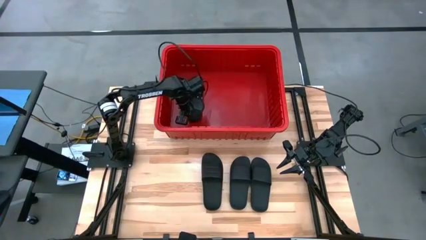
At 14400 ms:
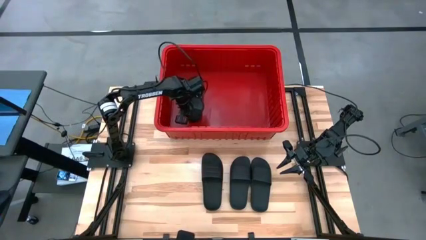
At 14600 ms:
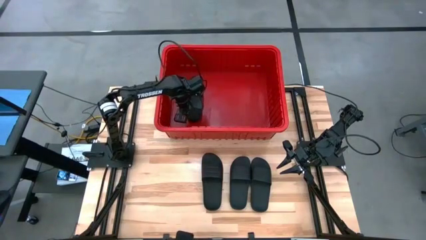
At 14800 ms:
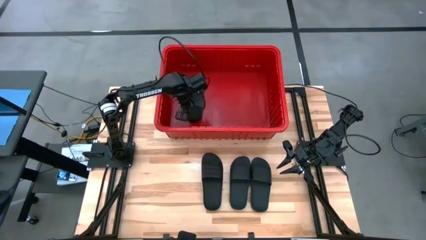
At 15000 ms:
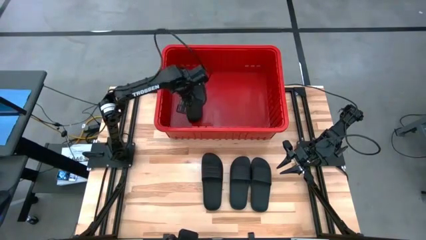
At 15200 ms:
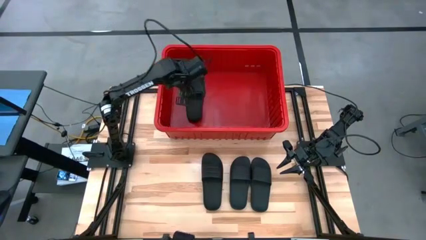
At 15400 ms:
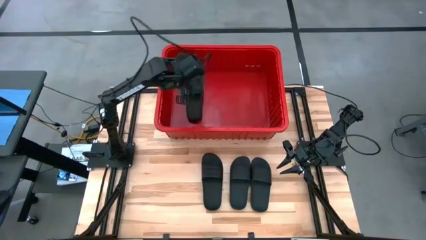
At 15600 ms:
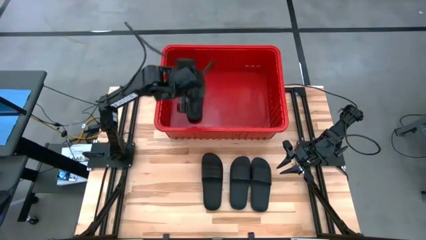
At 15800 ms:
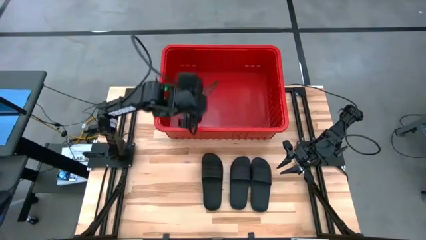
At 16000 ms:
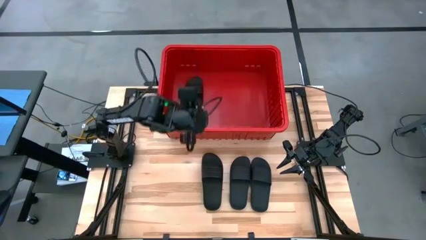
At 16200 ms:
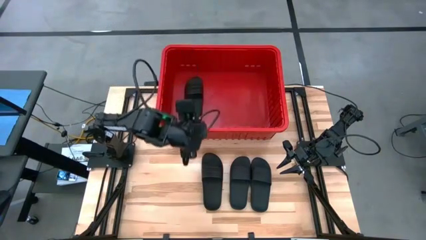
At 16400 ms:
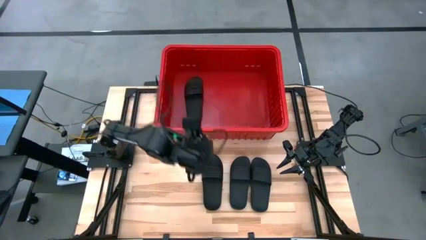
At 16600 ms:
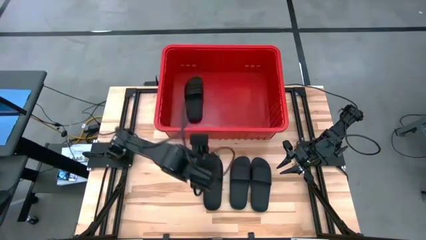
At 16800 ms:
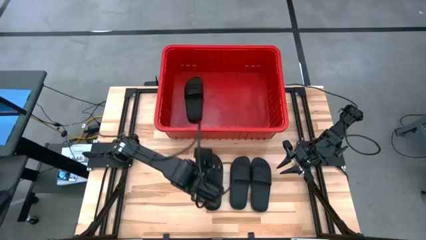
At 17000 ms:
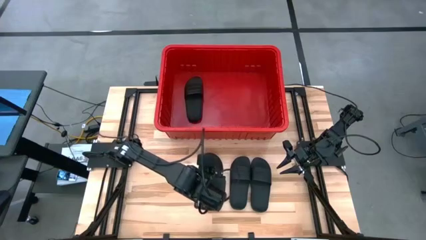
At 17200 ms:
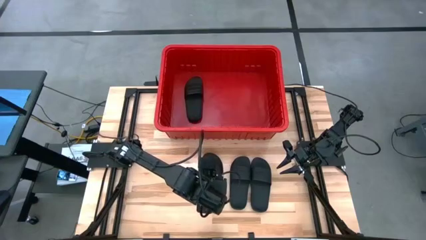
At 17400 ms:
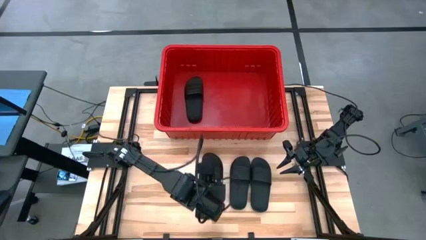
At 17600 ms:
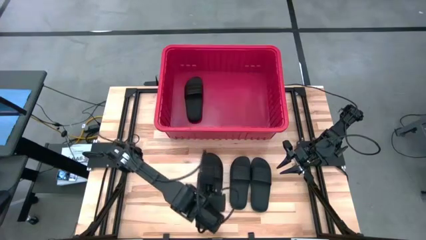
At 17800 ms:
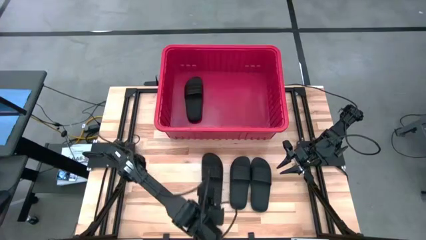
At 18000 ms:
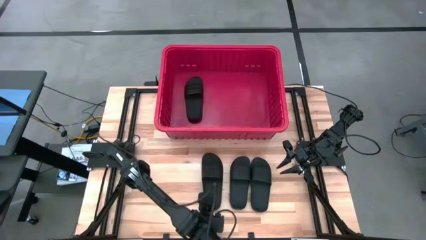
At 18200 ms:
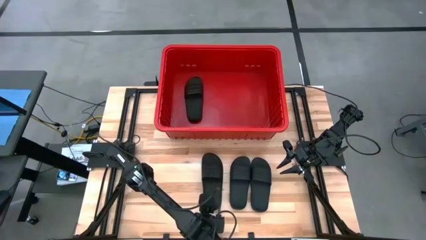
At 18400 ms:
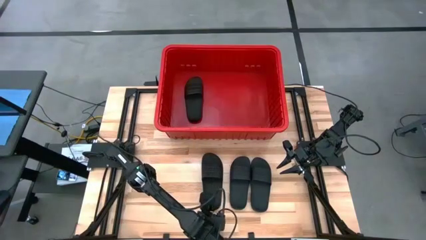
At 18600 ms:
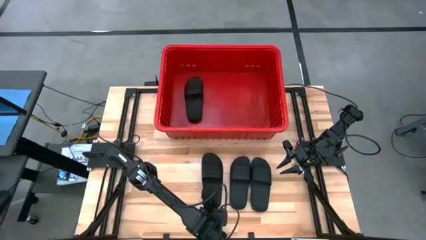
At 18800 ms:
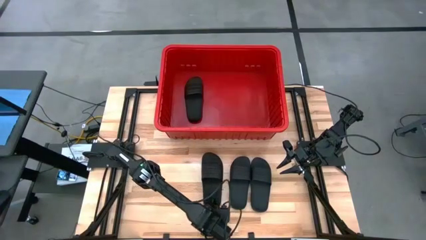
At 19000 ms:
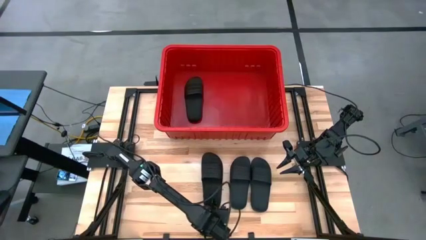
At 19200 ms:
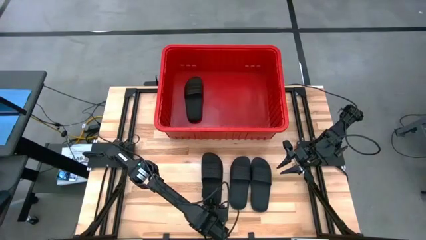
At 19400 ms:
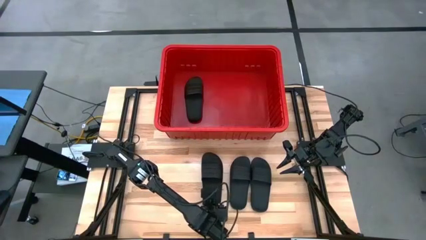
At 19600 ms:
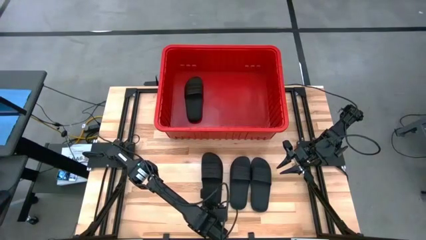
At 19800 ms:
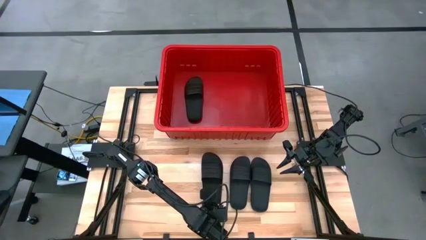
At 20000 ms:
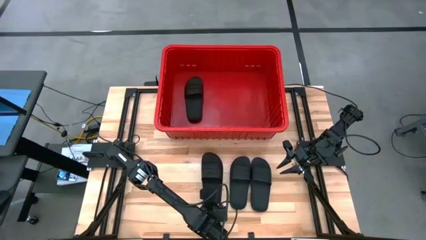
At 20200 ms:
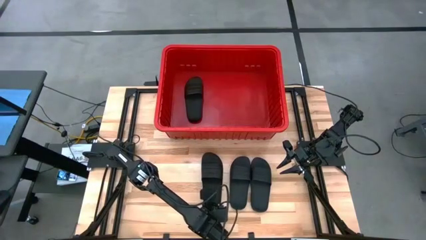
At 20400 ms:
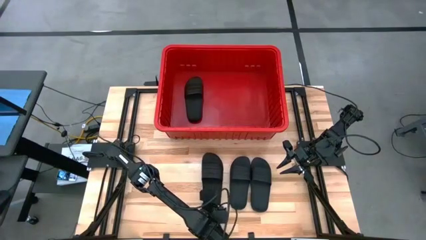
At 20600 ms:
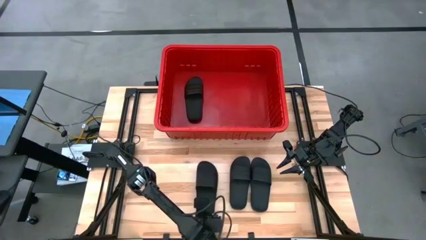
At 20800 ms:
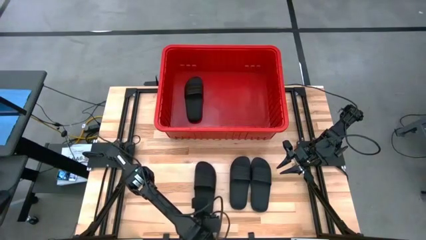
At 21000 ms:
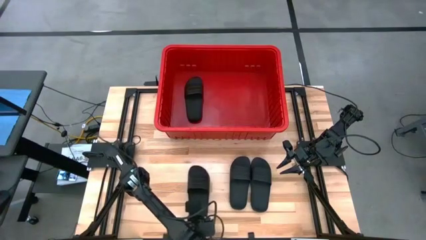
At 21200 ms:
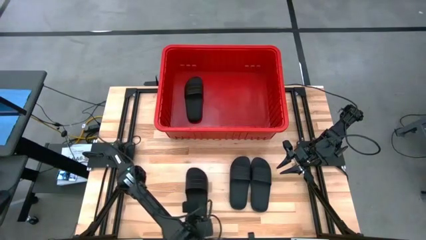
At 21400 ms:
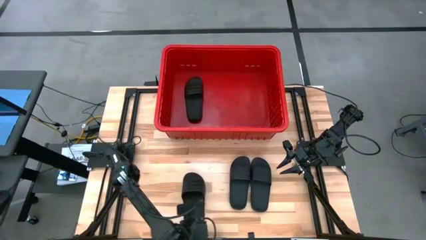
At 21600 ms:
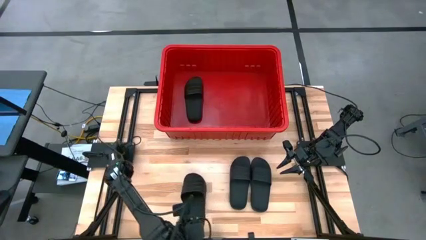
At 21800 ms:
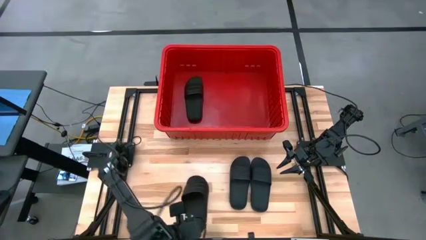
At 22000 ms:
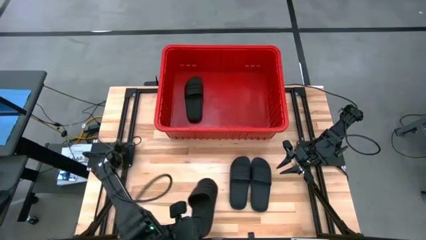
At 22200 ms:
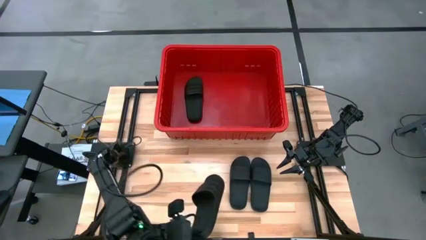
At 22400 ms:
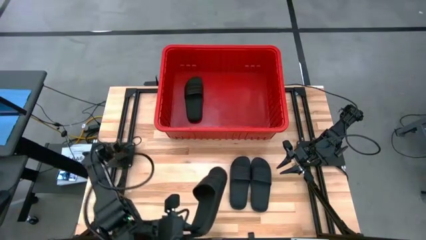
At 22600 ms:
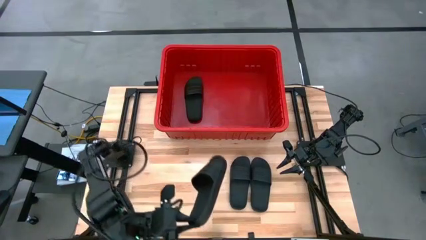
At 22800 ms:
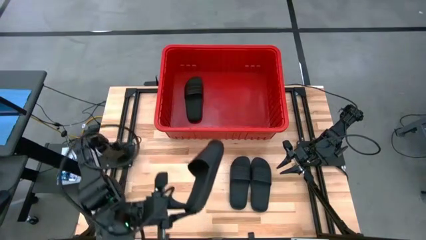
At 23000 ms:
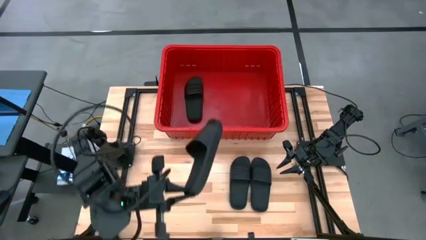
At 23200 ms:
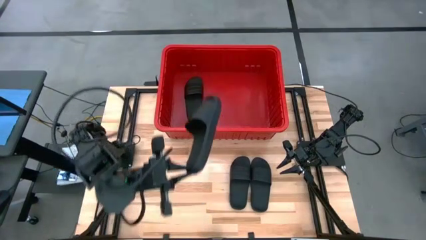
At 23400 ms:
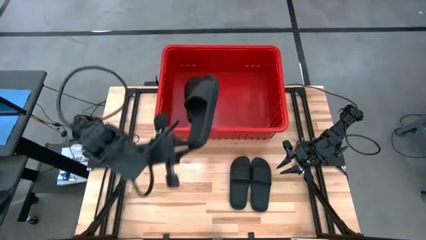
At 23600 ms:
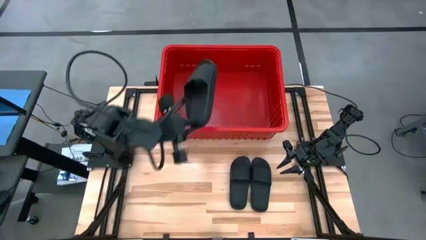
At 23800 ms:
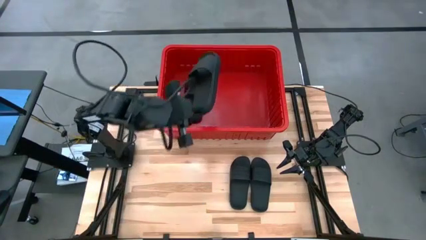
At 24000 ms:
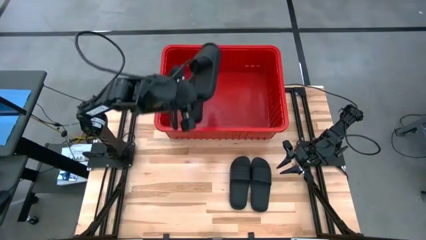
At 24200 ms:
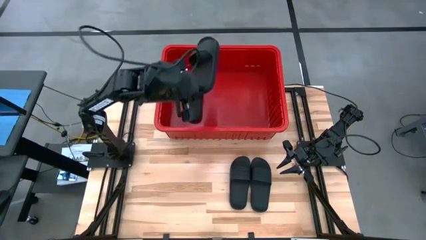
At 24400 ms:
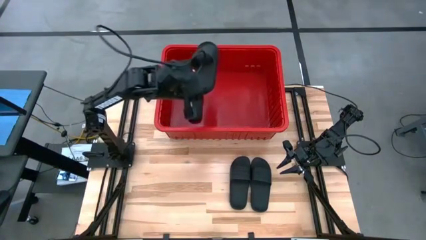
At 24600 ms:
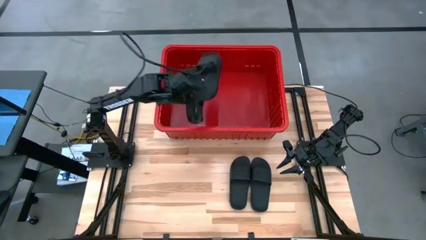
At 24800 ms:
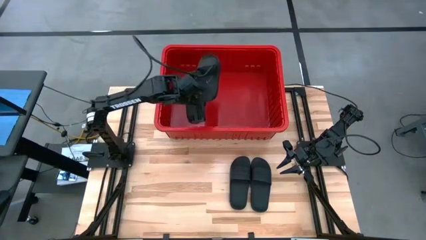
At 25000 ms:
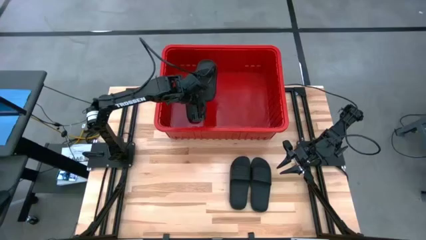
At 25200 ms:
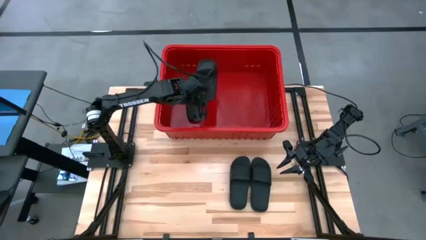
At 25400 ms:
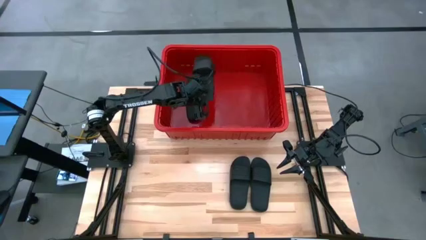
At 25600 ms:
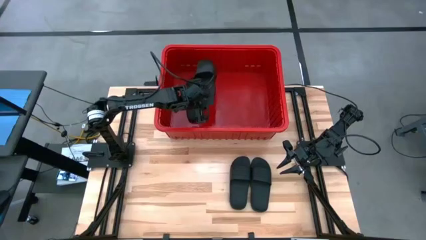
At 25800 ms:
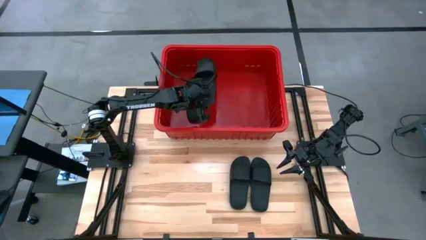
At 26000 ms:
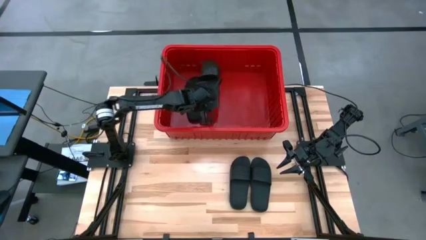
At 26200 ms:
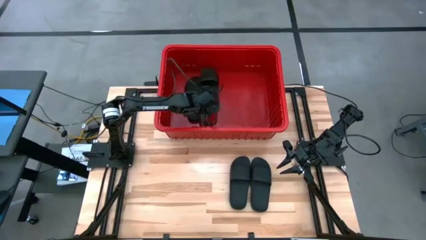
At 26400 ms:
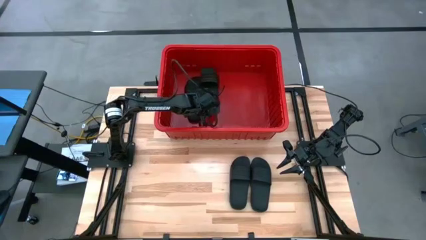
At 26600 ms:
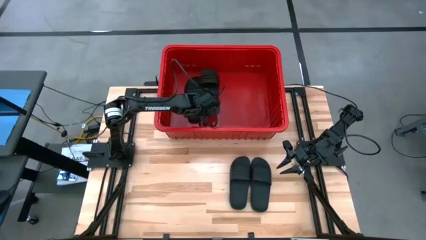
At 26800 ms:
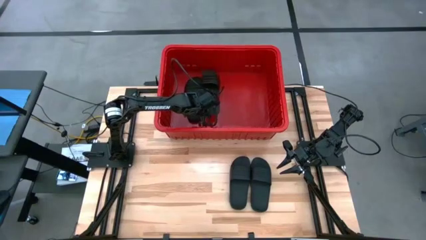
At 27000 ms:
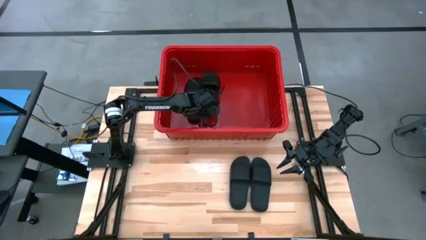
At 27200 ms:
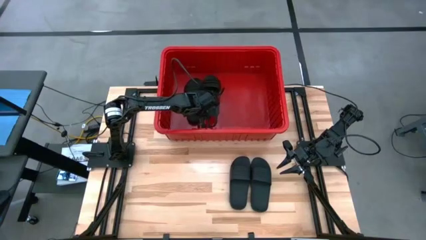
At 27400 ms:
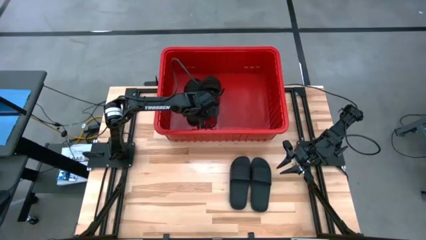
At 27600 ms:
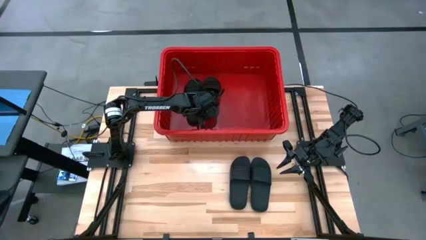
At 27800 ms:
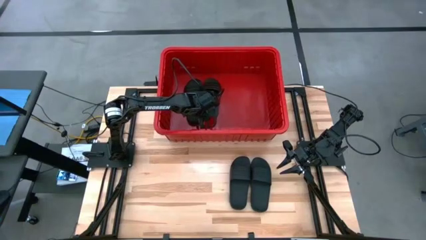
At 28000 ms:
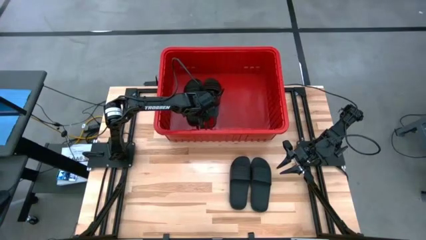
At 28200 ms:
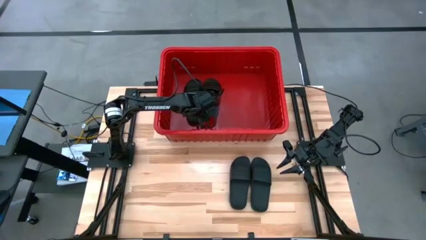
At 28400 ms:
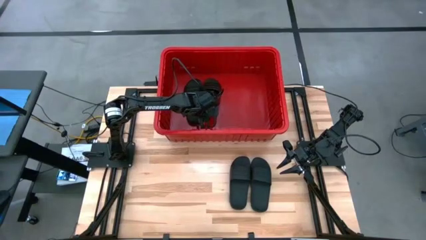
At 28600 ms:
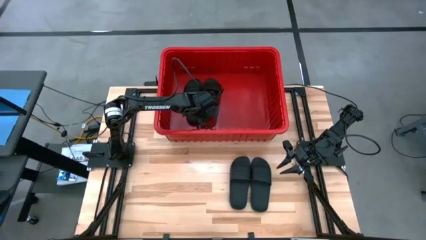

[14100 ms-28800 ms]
Task: Pick and place slides into bin
Put the black slide into the red container
